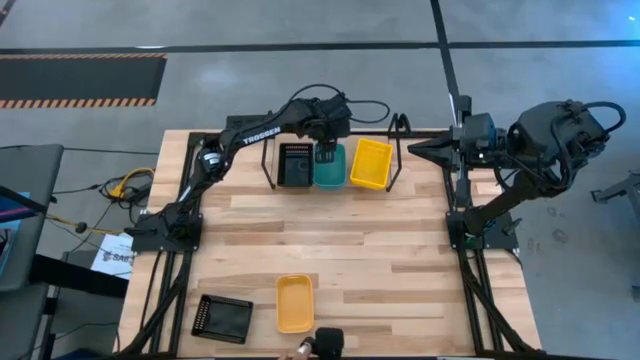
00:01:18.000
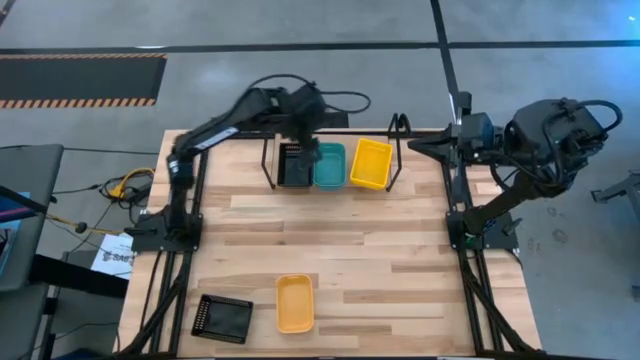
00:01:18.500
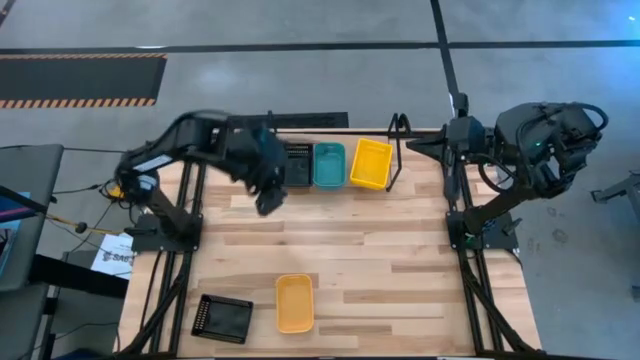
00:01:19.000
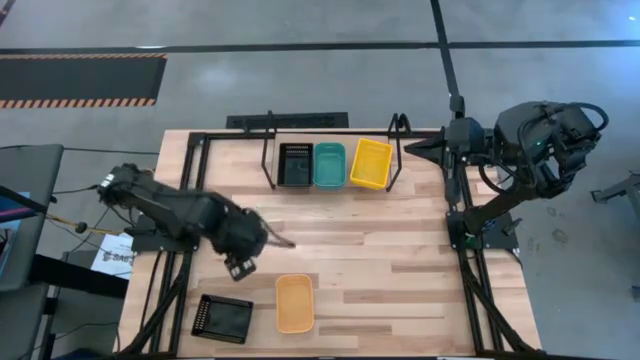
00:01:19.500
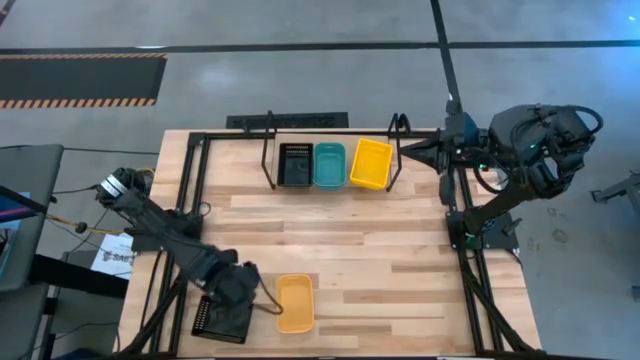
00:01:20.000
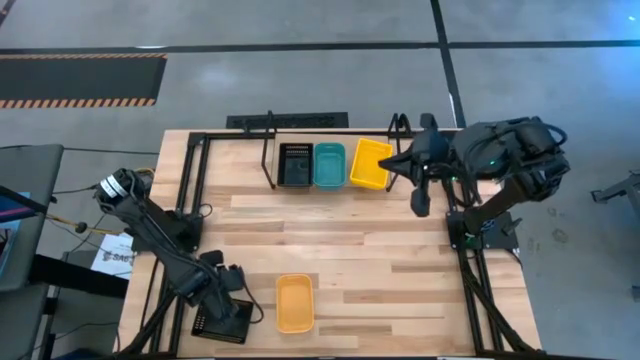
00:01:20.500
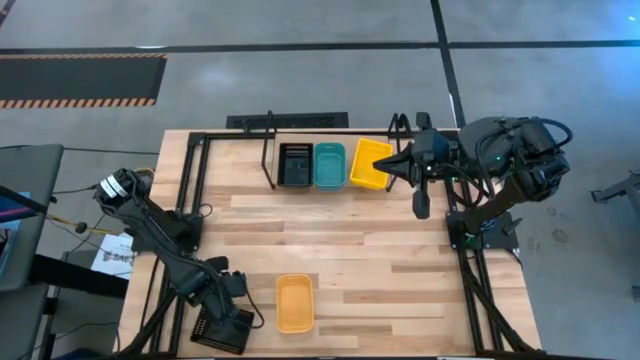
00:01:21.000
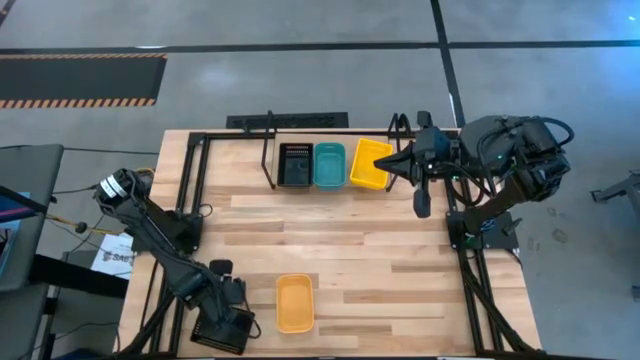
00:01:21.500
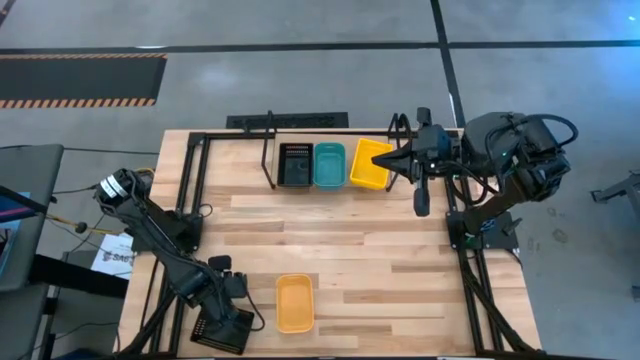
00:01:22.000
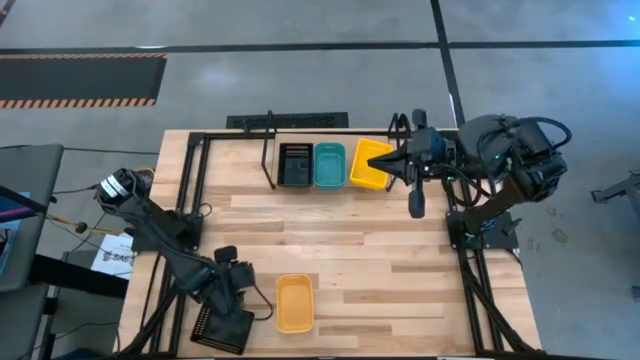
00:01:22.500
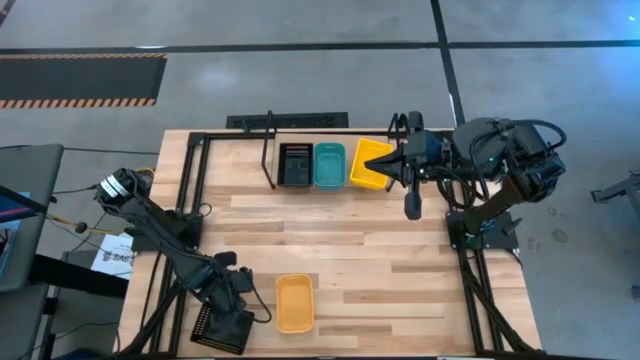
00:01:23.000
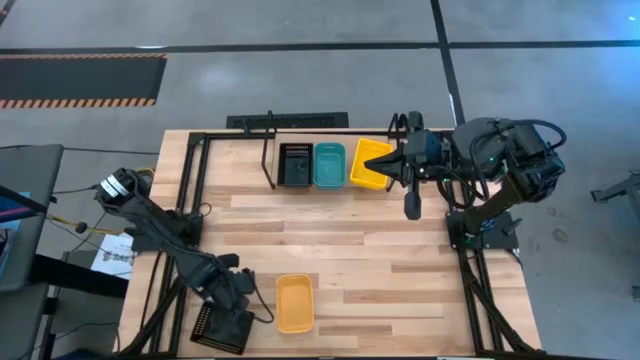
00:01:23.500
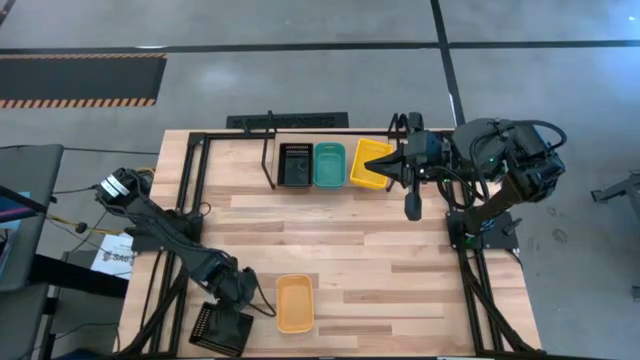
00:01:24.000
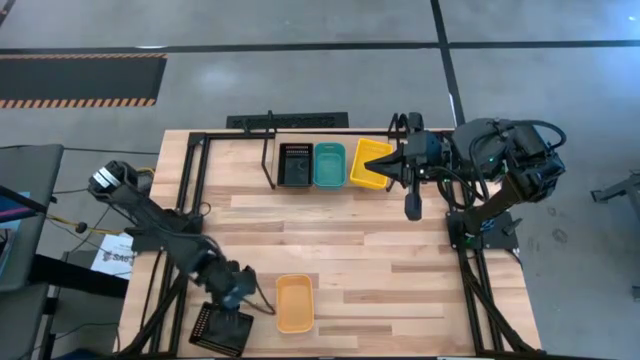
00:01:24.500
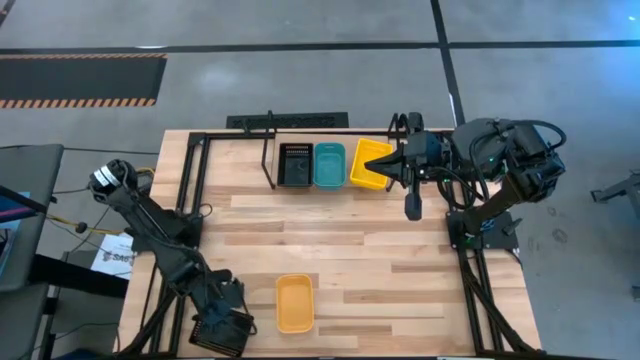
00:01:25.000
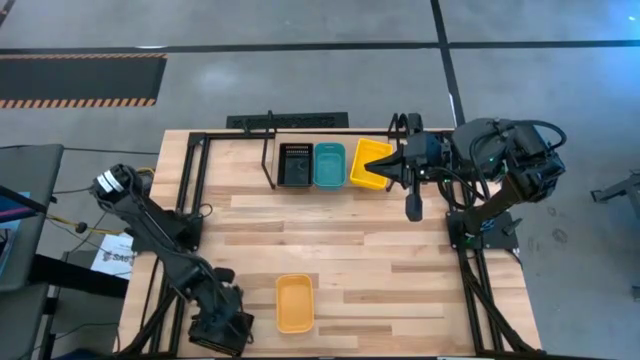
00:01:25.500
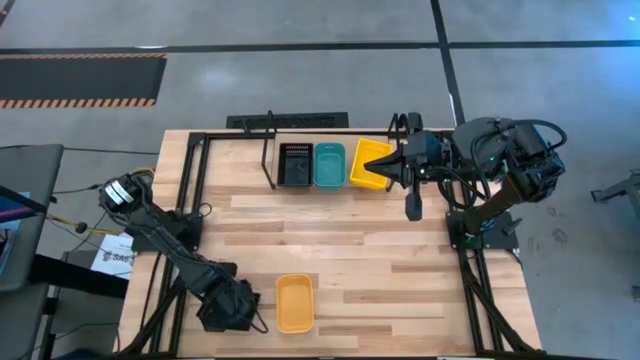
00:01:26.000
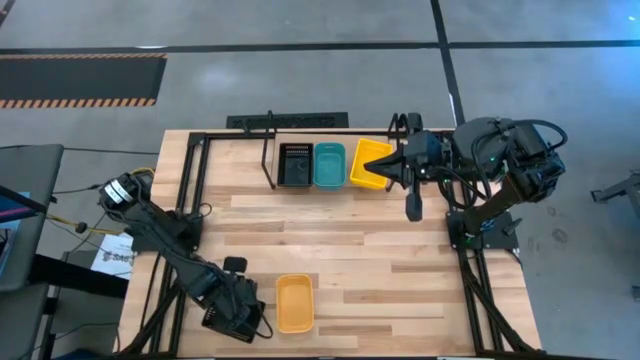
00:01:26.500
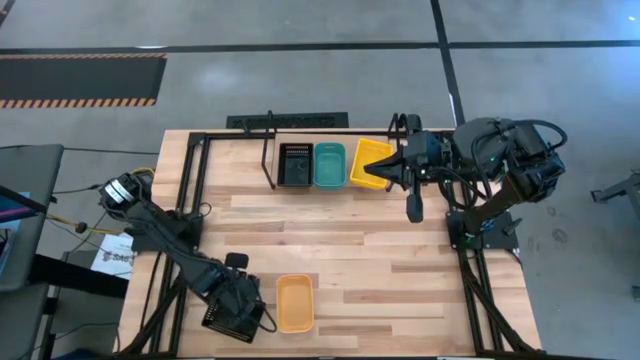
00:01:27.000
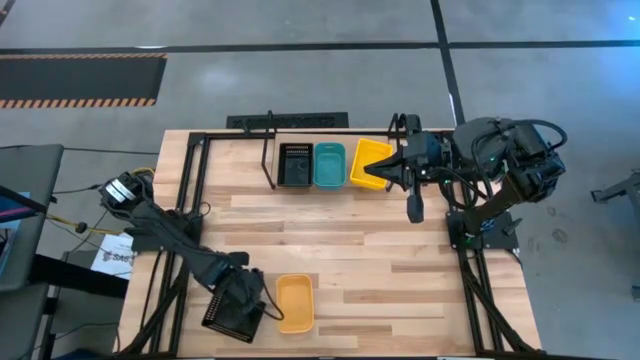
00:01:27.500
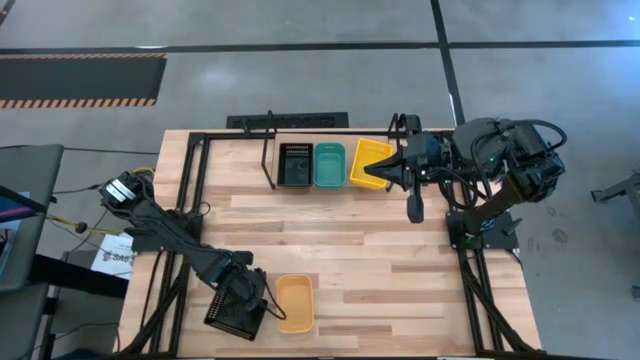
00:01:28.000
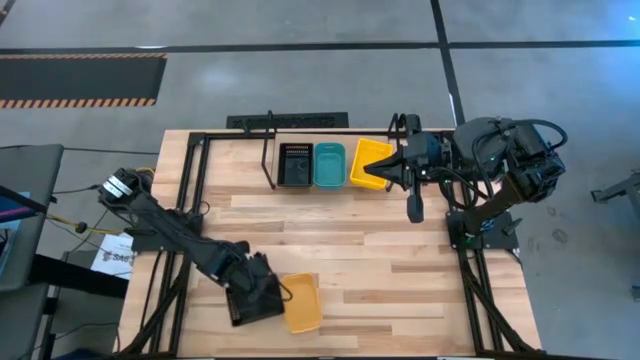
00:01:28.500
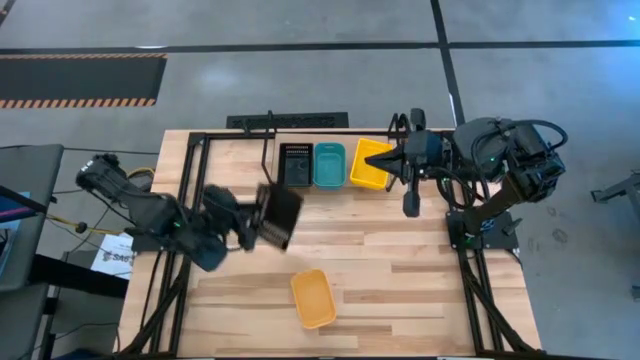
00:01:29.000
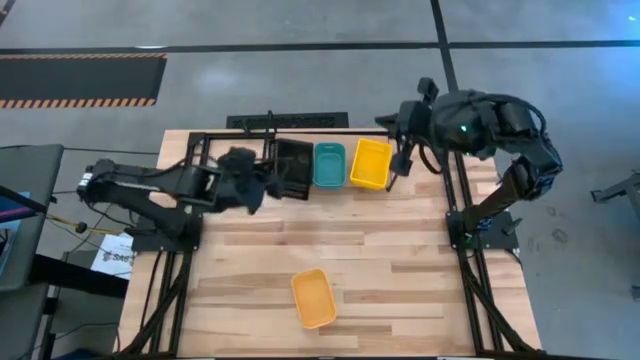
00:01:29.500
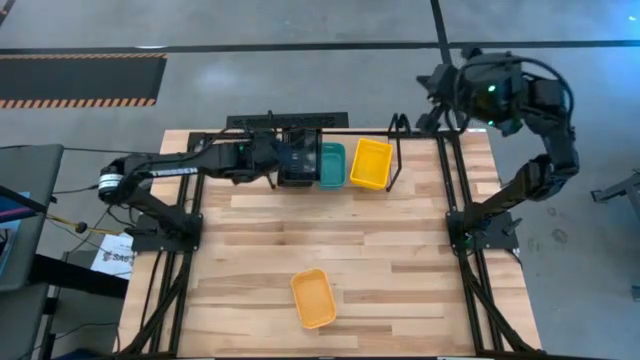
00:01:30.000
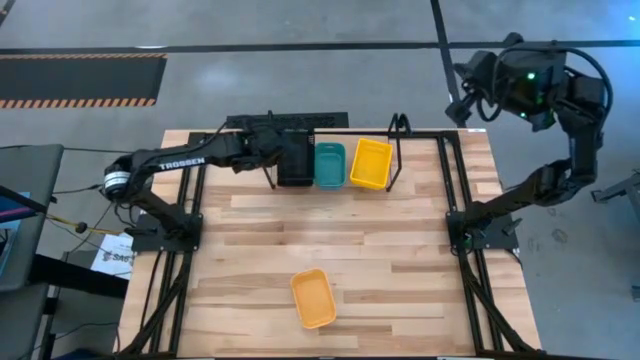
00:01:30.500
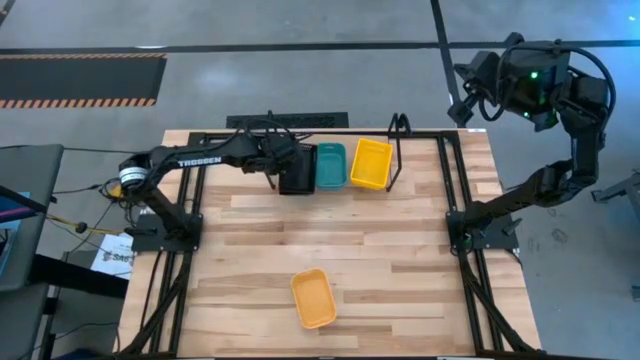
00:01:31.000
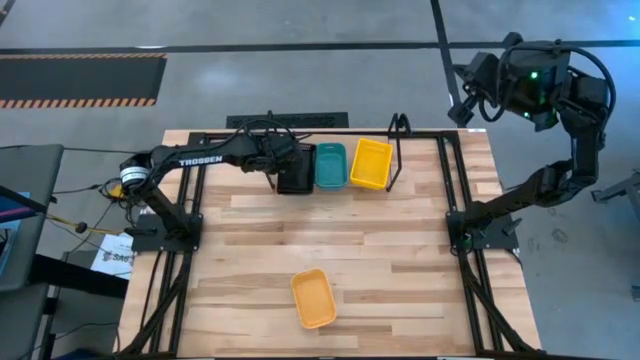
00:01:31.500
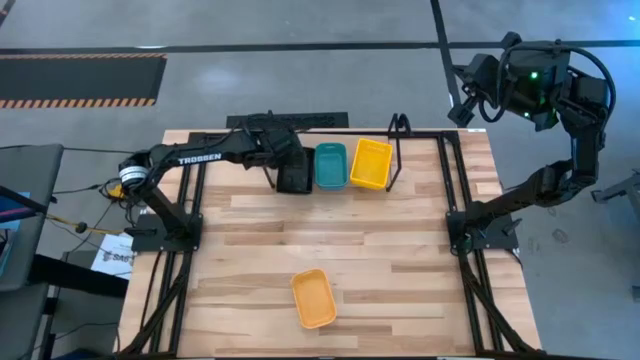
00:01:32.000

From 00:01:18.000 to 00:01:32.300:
Task: Stack baskets on shelf by color
Stack the black bin on the black bin

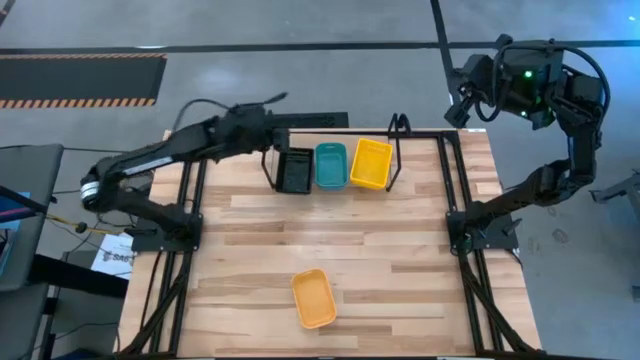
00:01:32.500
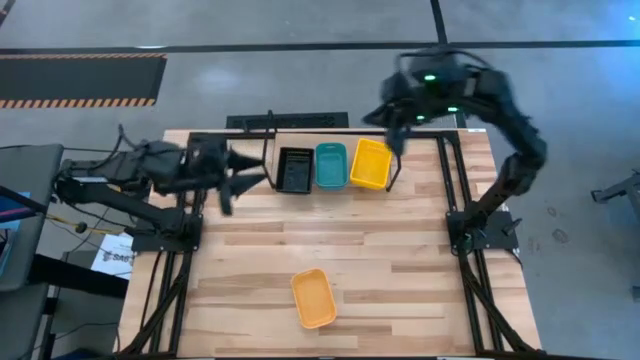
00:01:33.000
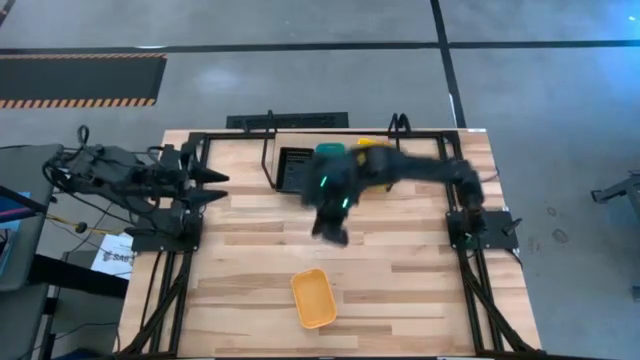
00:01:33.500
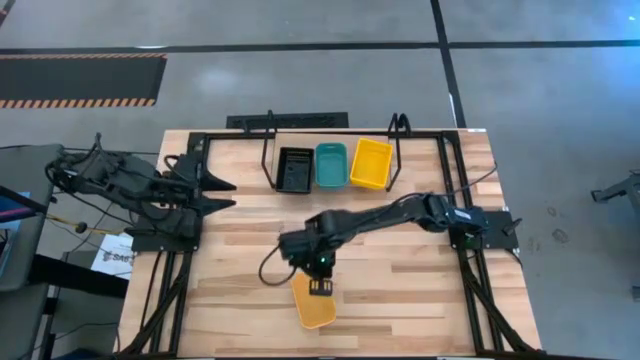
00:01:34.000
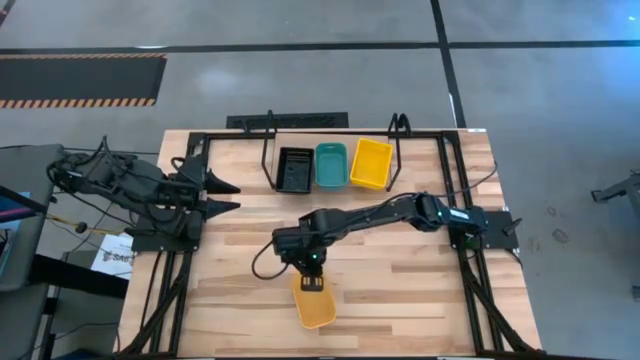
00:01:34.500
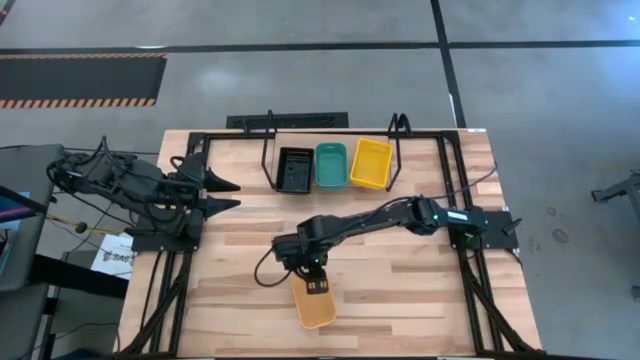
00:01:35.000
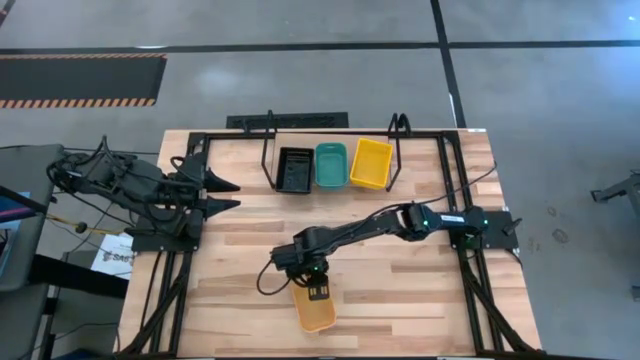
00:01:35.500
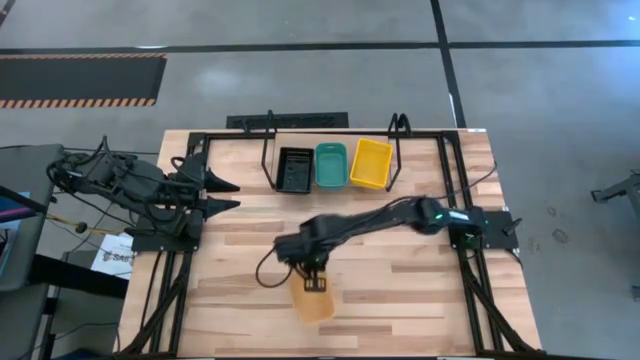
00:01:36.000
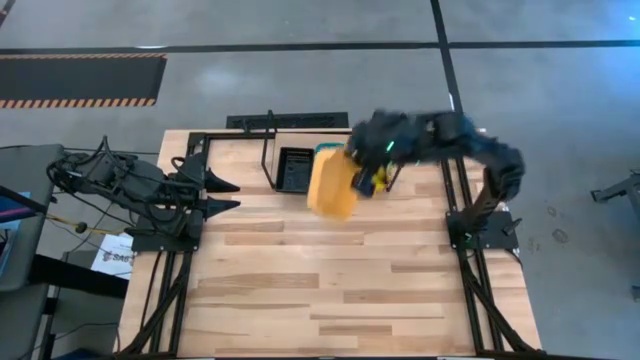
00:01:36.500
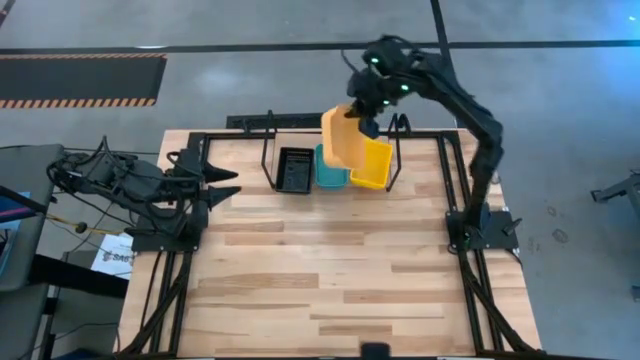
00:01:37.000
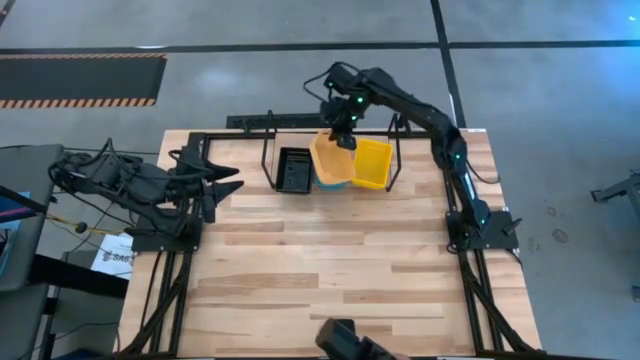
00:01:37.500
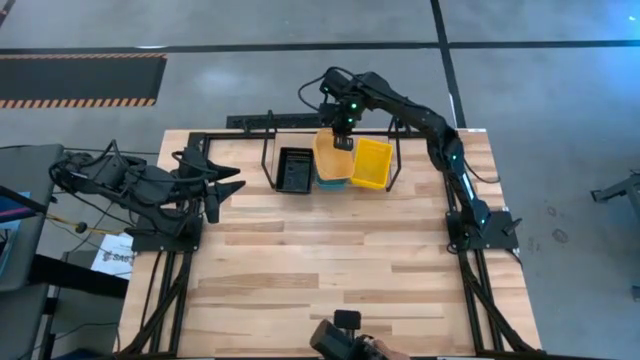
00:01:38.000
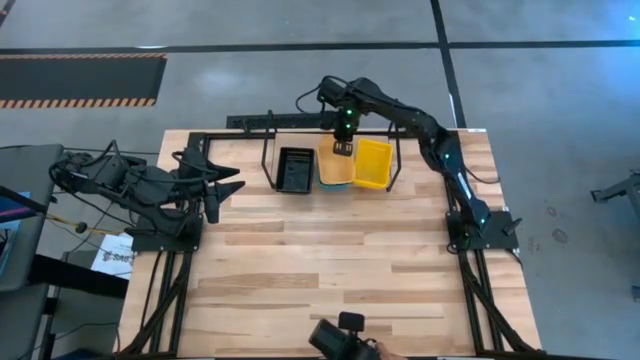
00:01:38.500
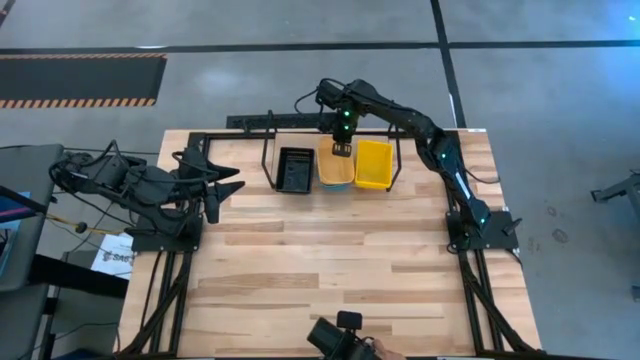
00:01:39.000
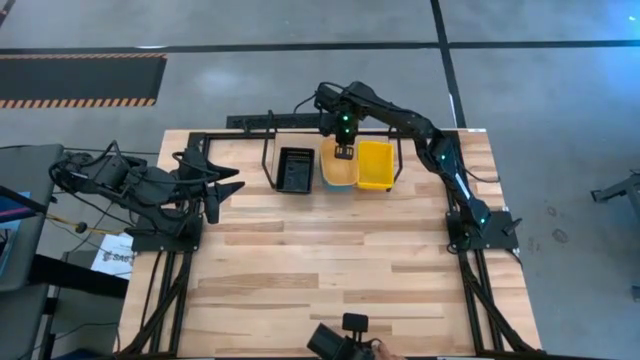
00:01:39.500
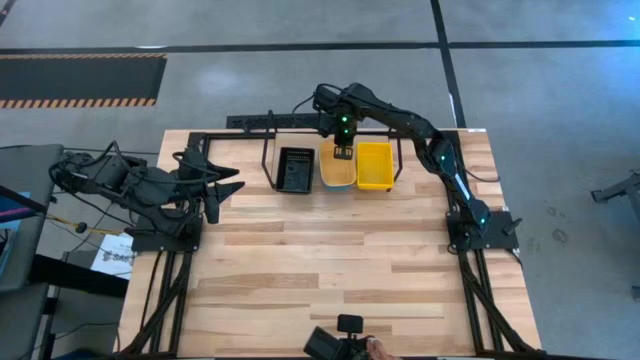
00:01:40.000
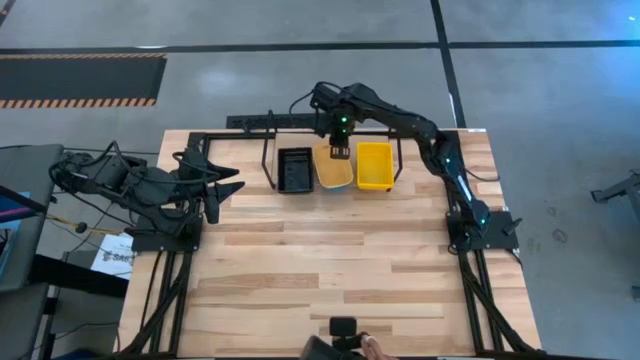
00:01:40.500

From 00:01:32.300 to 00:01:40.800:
Stack the orange bin on the light blue bin
